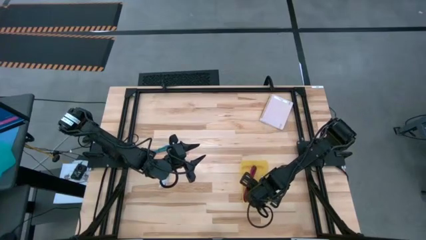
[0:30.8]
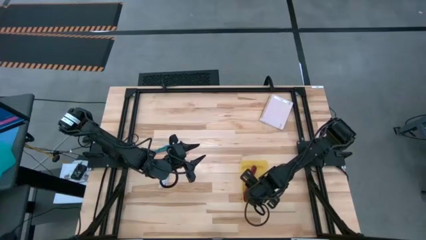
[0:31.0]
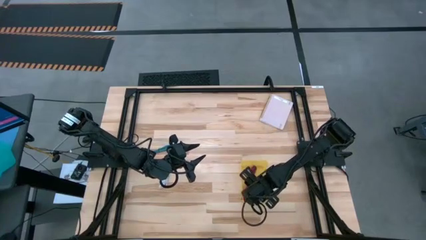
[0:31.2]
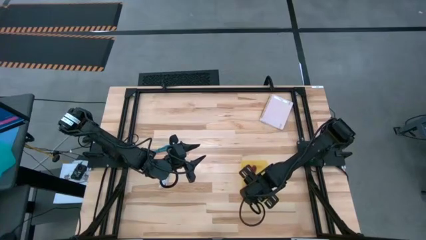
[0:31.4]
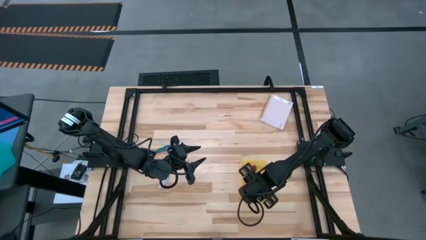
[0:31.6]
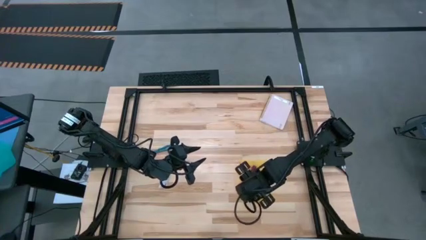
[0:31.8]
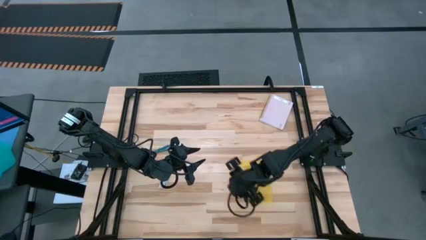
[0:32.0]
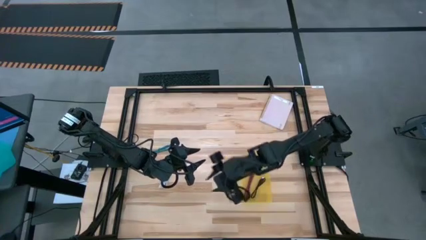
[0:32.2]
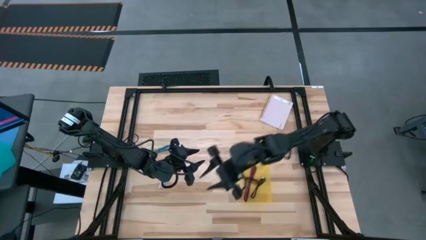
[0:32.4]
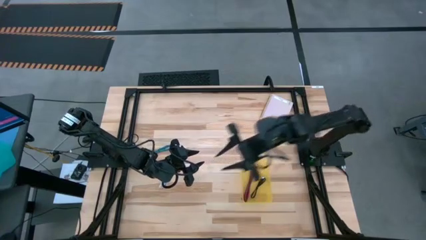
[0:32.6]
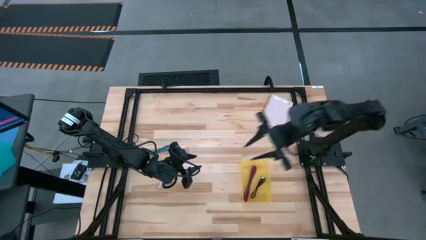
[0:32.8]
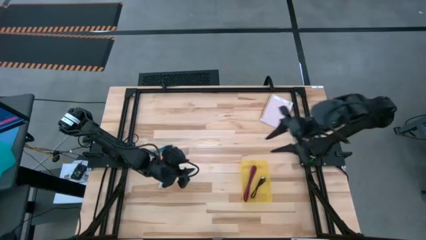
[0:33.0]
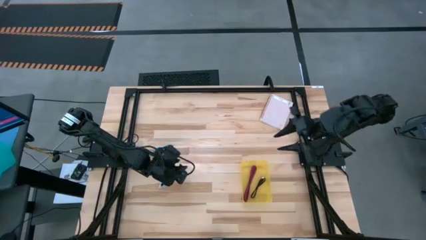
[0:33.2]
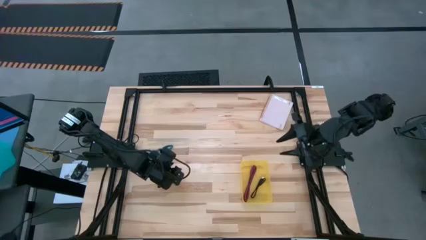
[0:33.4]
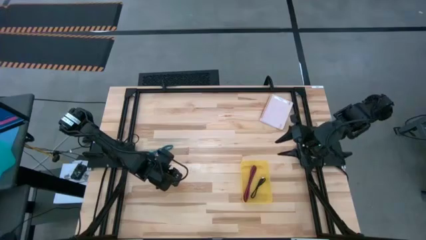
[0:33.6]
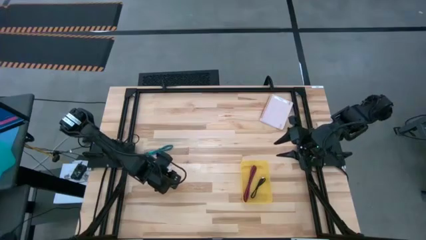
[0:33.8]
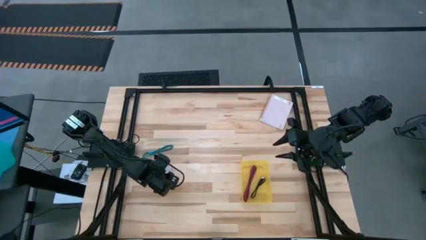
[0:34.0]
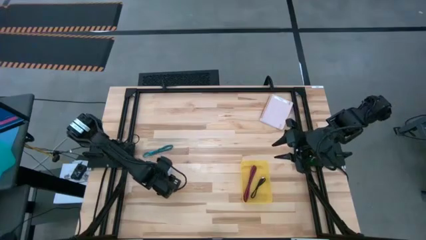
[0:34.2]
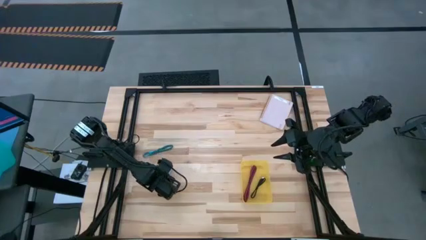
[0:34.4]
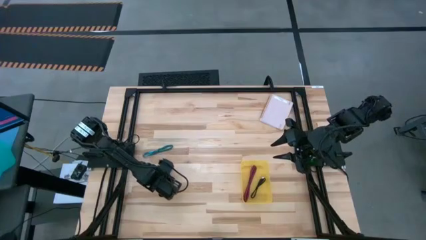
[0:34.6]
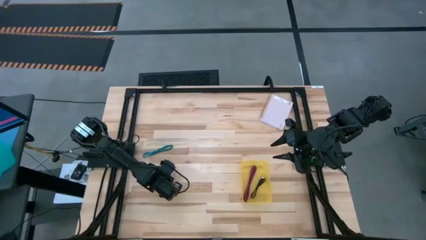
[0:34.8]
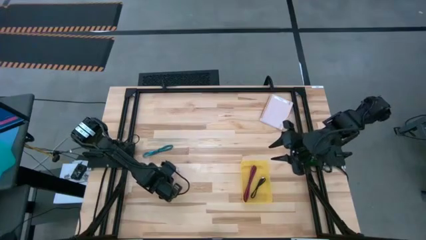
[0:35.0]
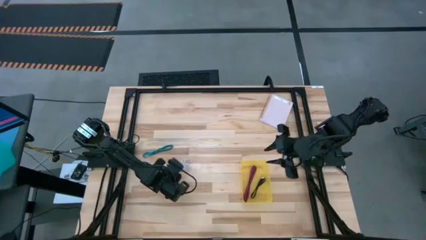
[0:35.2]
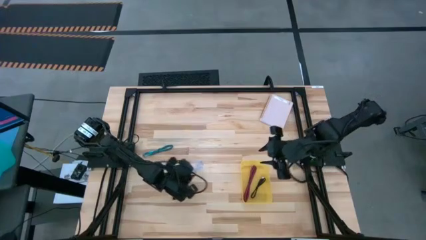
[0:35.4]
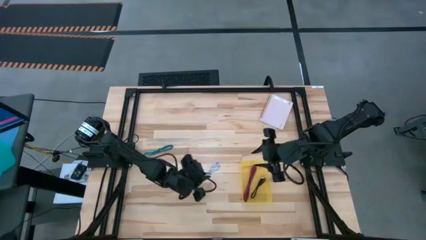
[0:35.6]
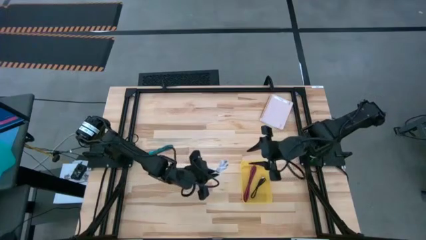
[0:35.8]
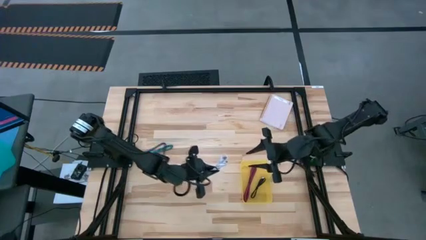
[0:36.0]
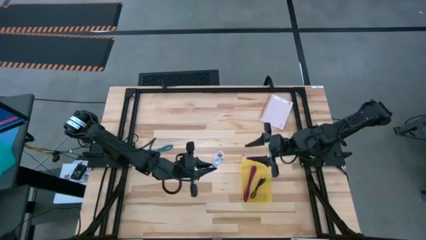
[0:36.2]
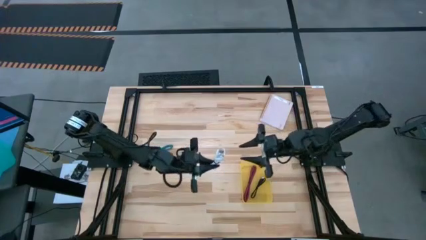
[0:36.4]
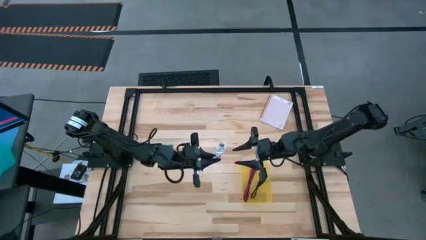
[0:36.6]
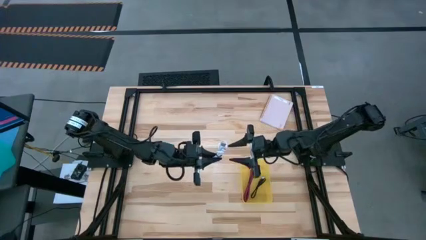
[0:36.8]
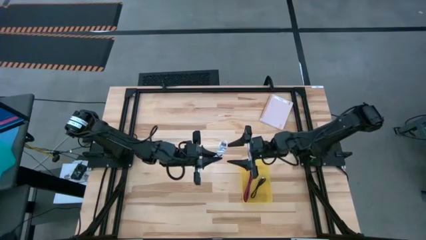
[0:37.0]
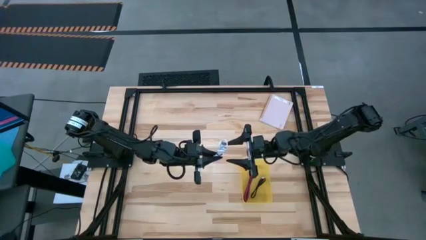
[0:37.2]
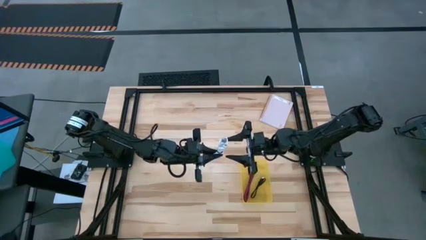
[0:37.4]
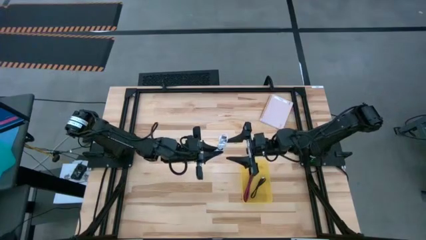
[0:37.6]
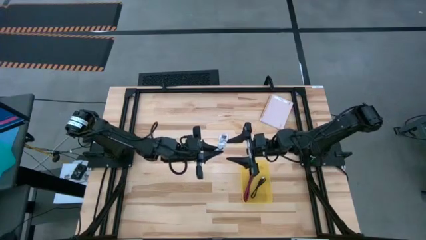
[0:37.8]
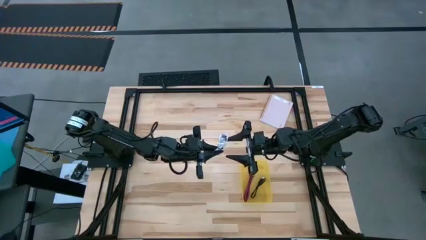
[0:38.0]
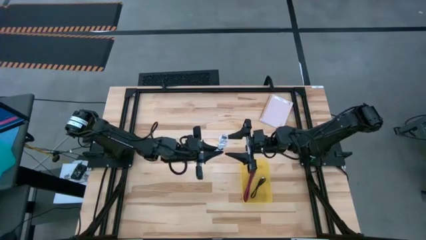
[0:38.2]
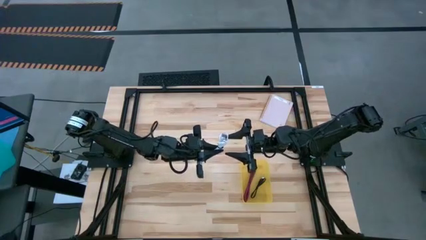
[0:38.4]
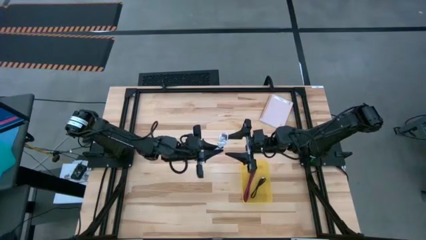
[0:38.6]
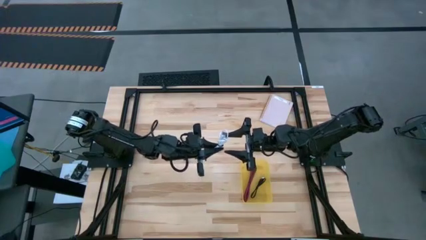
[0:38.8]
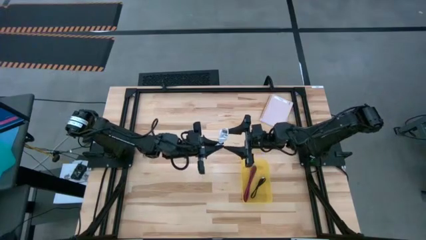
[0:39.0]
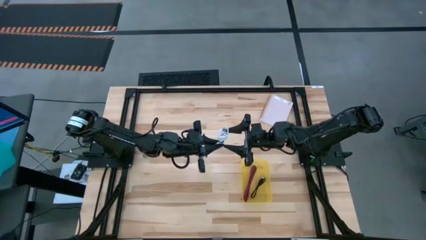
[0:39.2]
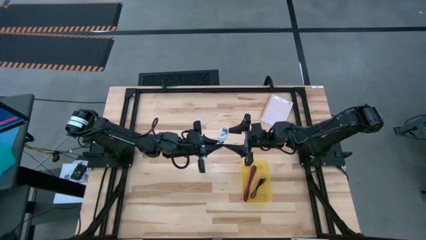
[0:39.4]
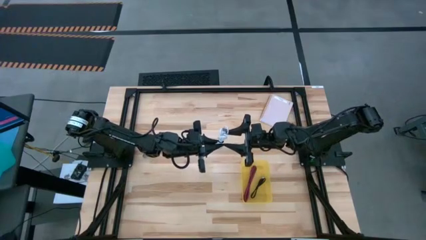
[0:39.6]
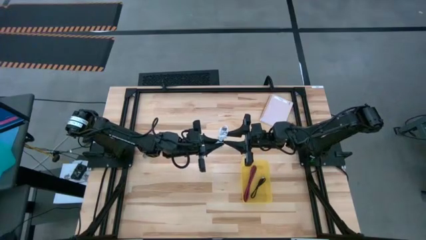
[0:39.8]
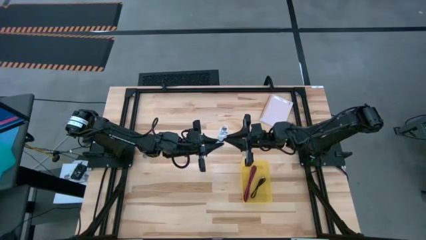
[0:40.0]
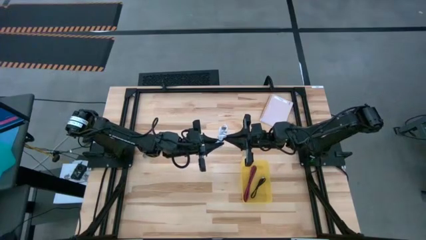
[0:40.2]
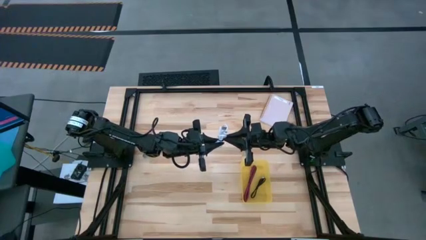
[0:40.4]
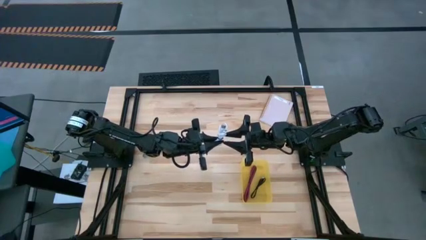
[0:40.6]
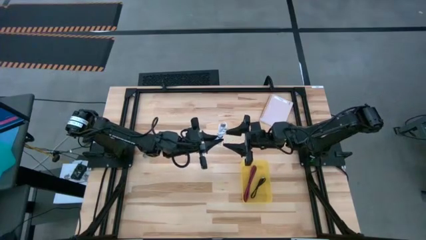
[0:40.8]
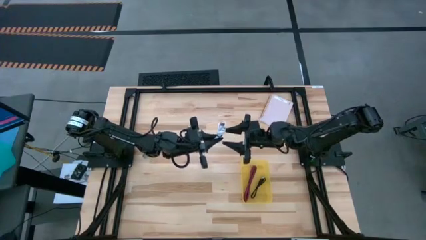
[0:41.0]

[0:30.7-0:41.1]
Task: Pick and place USB-C Cables
Put the white charger cable into the yellow bin

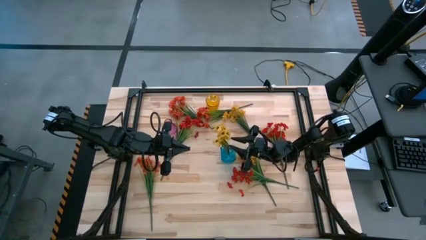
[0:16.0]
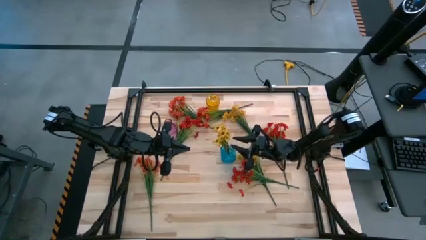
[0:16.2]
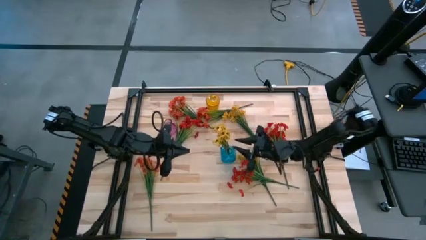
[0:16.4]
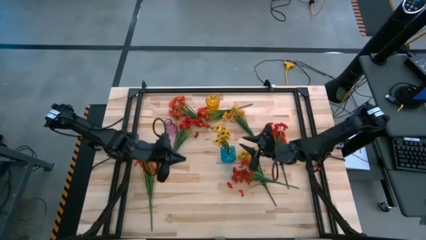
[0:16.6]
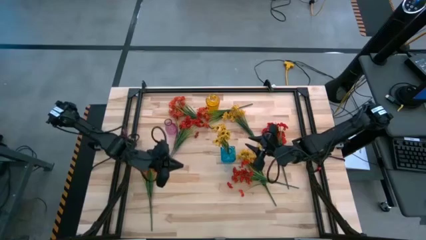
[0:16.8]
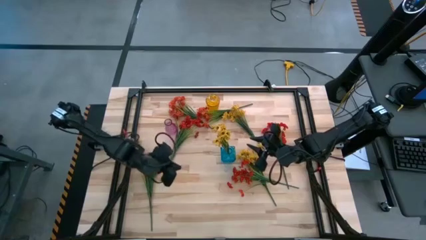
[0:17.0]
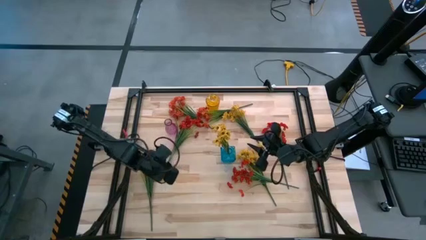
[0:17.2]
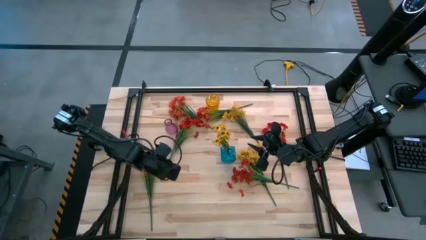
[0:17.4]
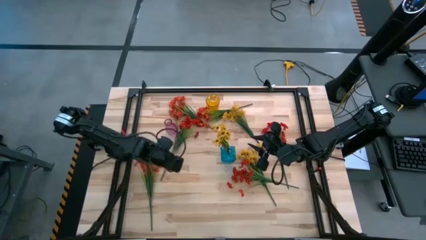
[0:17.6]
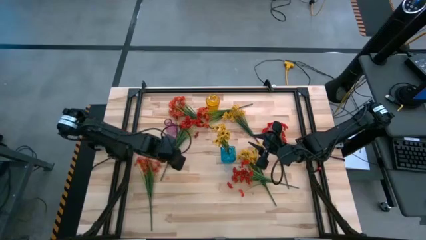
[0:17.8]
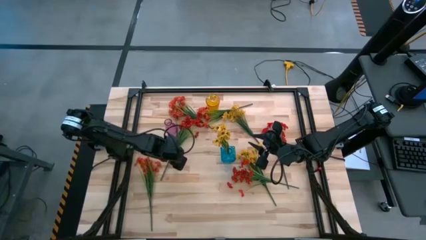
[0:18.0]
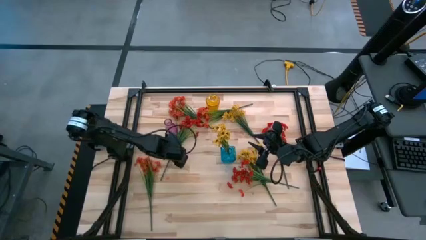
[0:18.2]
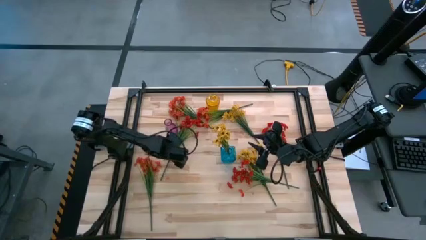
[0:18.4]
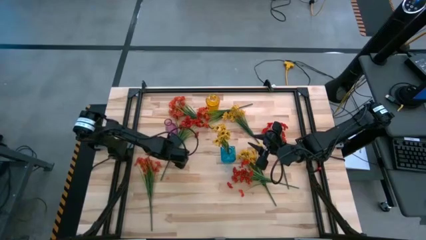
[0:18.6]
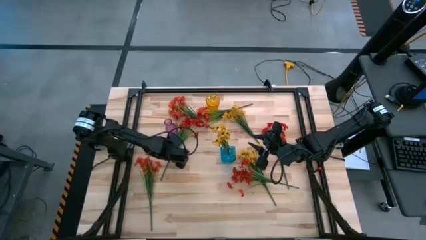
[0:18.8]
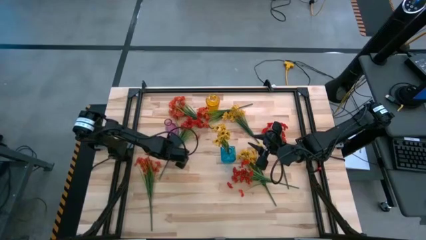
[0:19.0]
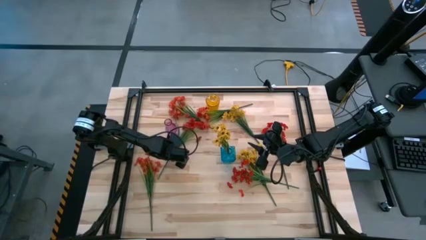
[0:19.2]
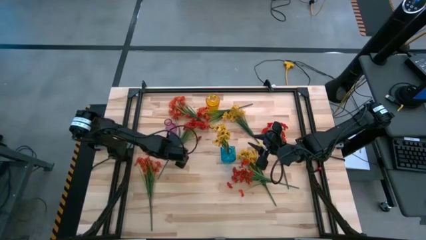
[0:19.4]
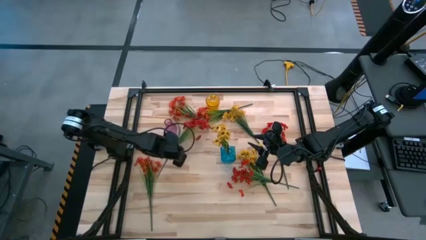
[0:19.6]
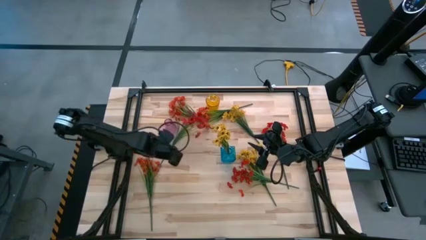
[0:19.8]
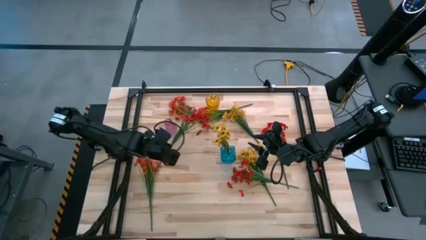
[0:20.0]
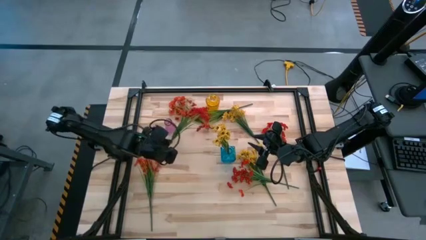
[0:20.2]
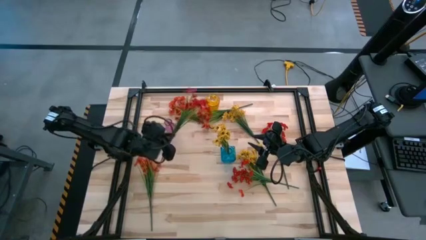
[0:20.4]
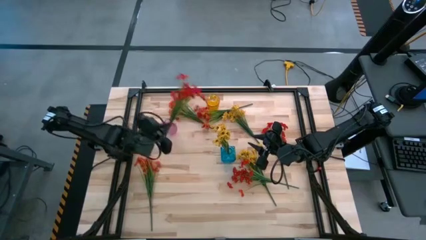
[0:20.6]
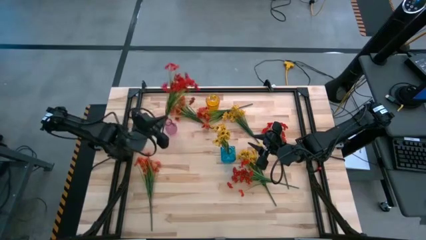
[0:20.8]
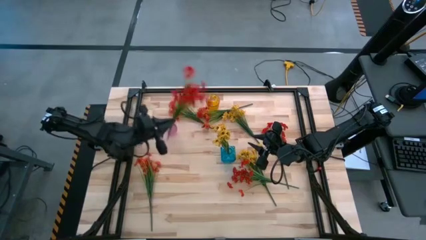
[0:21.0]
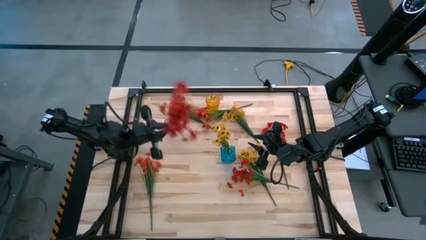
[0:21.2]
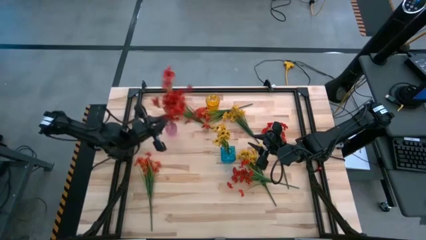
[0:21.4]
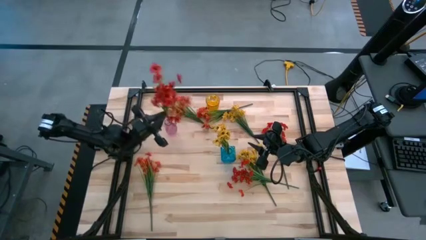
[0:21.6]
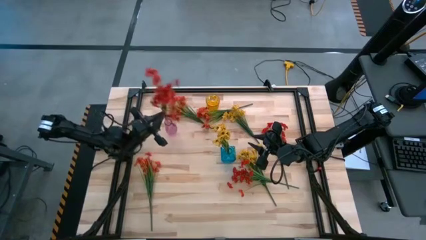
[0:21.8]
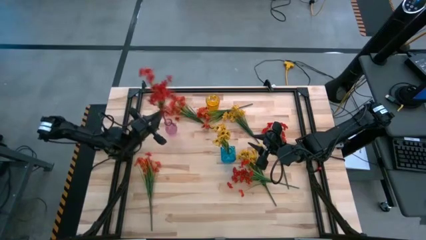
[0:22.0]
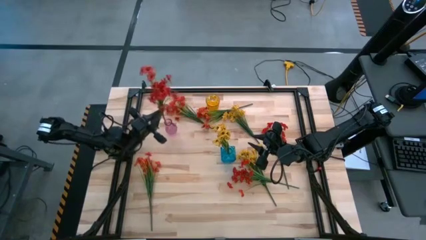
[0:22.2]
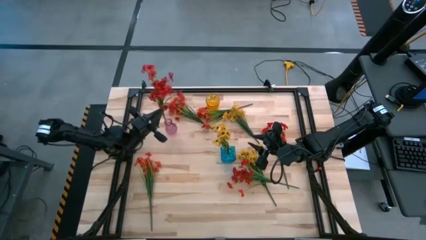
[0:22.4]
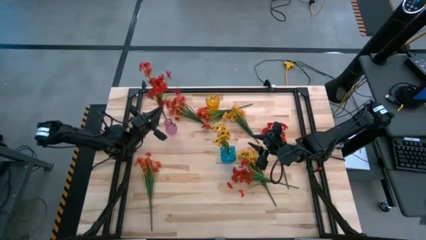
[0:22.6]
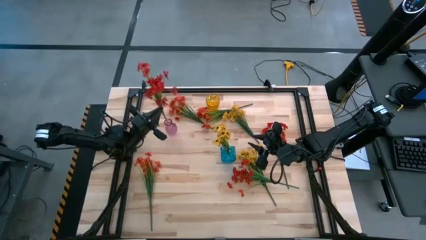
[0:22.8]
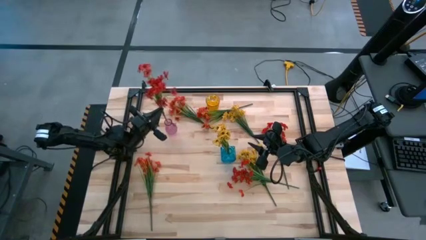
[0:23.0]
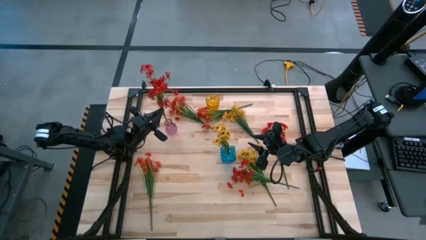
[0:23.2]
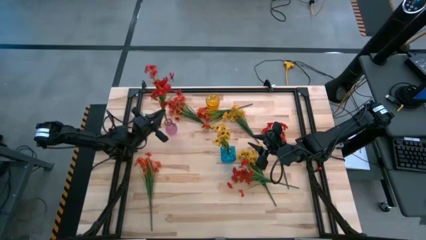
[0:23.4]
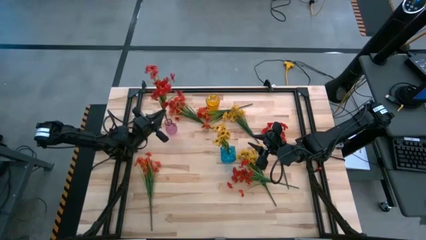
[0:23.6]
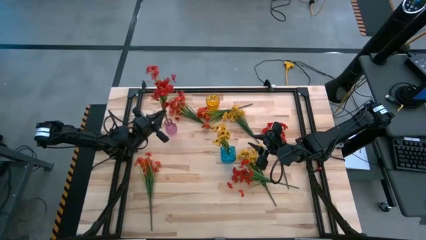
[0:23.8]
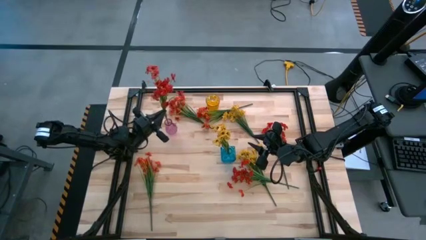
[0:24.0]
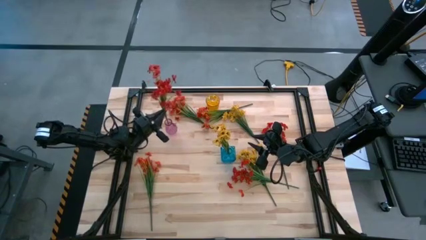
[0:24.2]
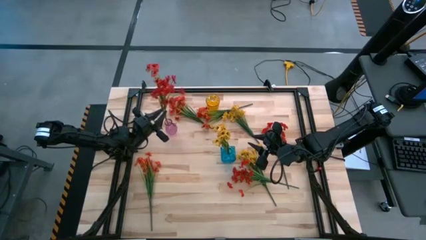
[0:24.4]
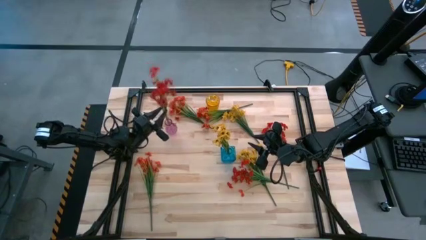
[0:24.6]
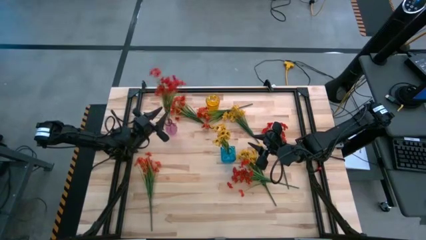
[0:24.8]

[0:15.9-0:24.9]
Task: Sort flowers into vase by color
Put the left red flowers into the purple vase
